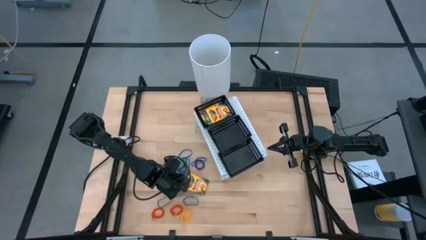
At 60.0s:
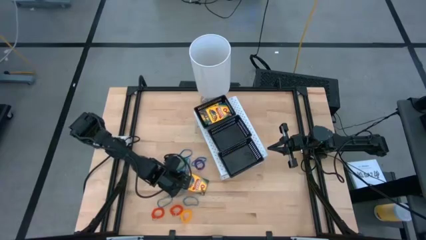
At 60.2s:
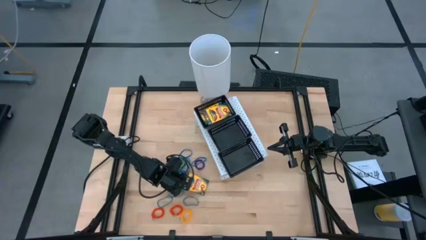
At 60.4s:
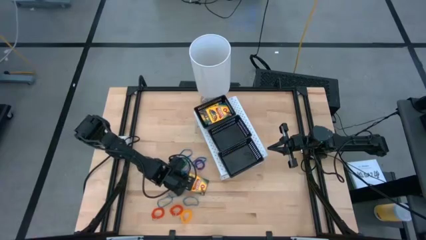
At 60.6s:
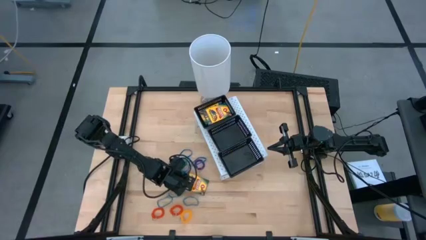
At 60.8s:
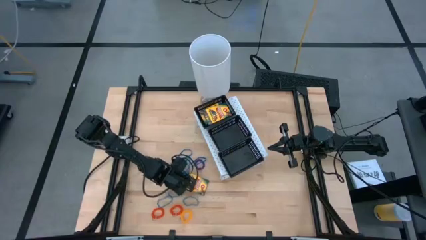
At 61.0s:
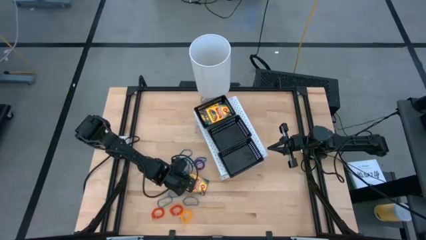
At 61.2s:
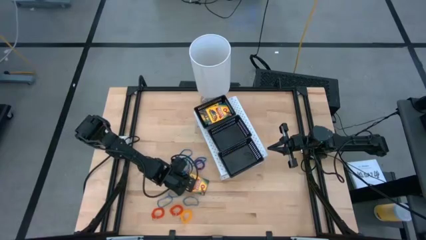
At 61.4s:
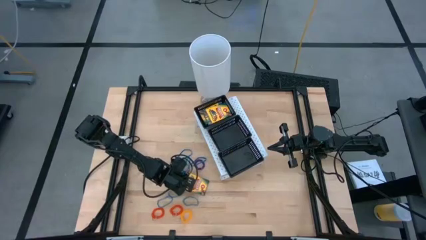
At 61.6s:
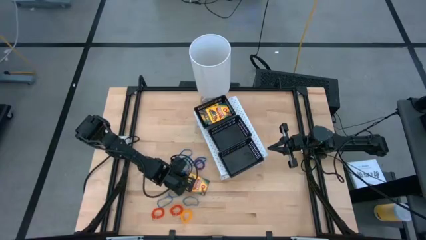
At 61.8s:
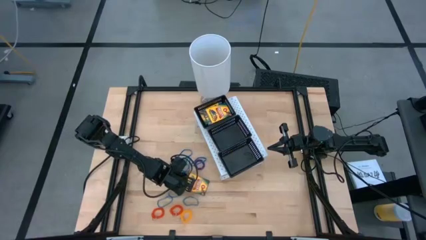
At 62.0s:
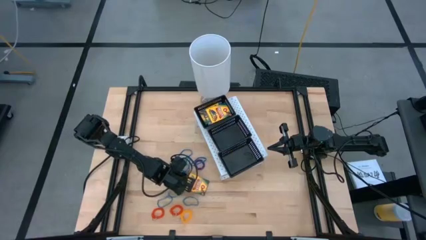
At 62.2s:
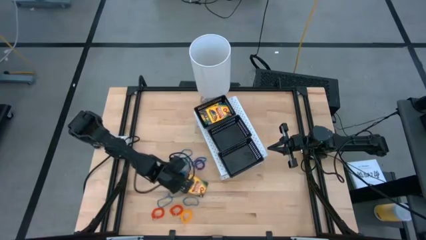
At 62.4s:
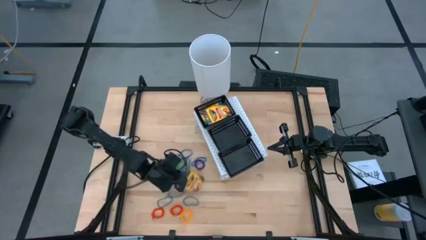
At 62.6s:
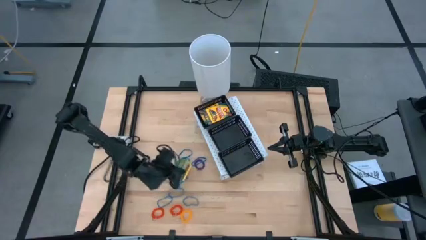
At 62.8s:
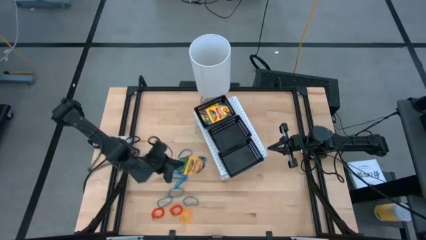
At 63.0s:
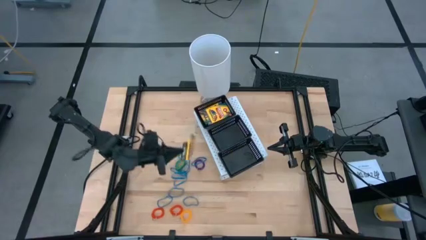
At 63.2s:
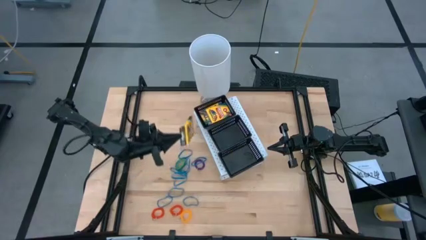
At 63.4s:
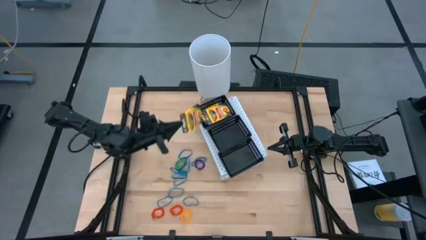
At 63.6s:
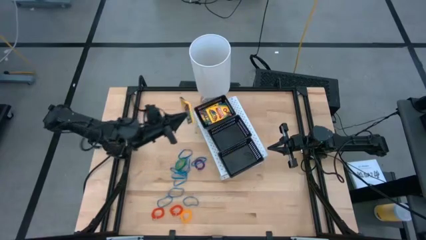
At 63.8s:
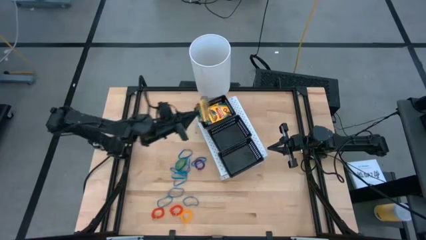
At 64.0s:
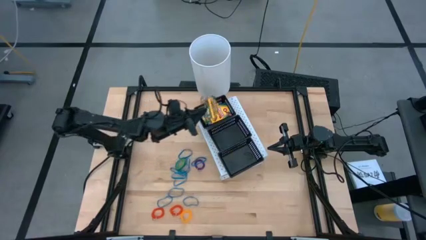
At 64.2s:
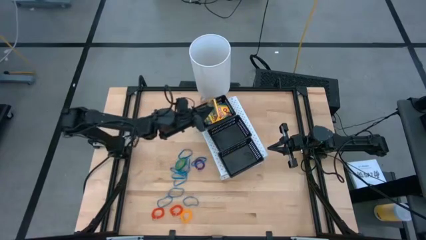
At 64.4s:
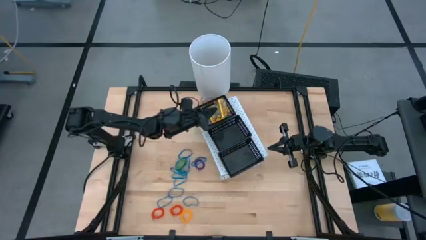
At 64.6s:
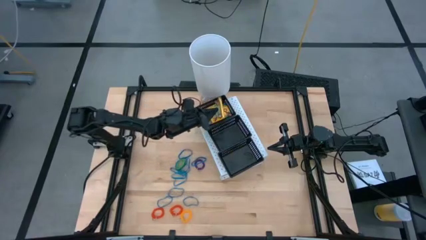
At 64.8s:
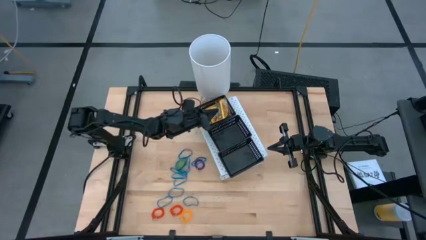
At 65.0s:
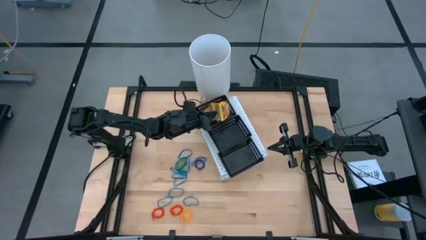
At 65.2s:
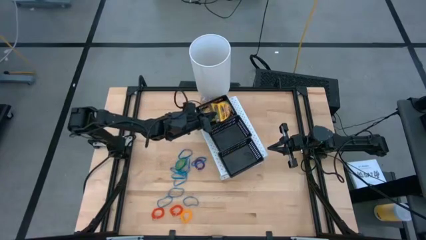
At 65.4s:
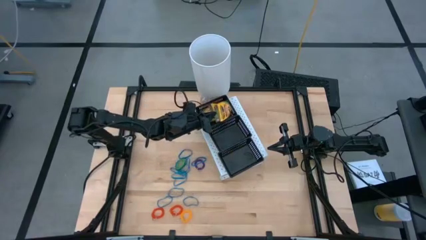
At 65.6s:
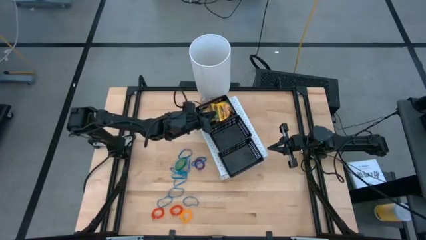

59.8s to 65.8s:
Task: Pick & Place Office Desk Supplies
Put the crayon box into the top black bin on the shelf

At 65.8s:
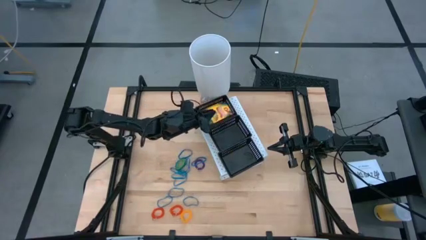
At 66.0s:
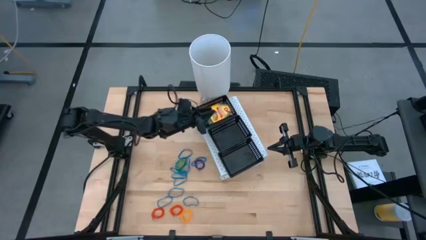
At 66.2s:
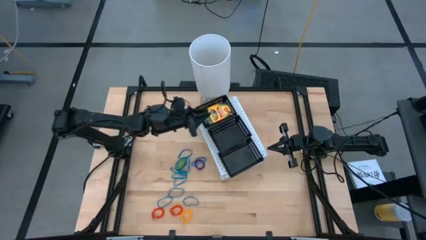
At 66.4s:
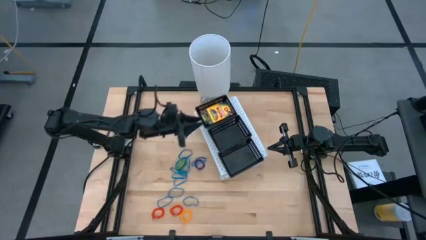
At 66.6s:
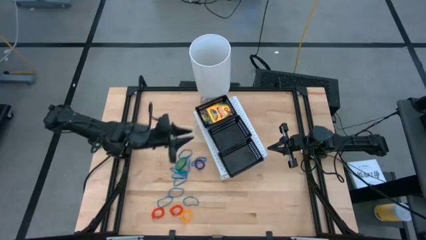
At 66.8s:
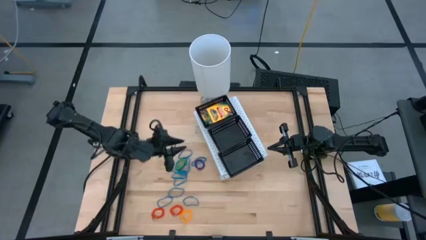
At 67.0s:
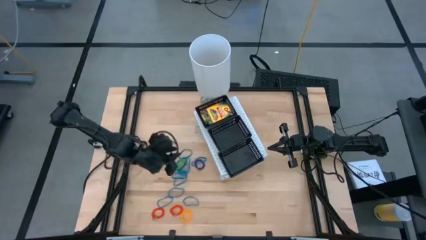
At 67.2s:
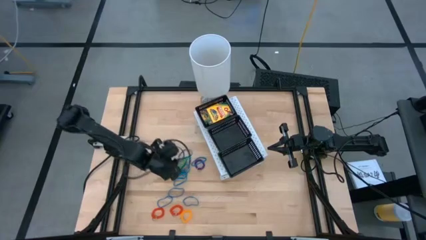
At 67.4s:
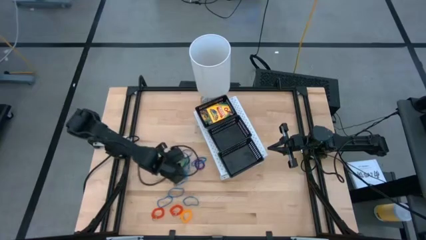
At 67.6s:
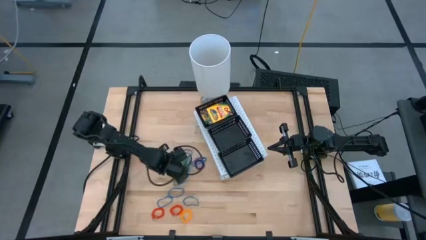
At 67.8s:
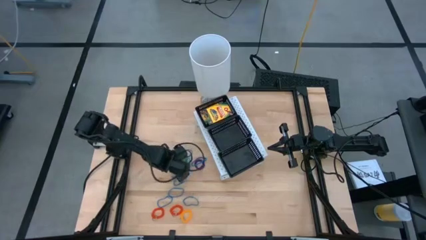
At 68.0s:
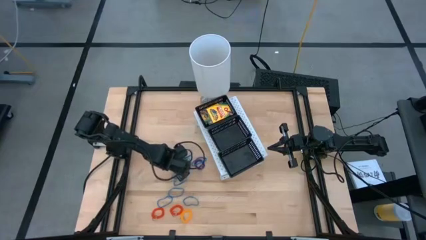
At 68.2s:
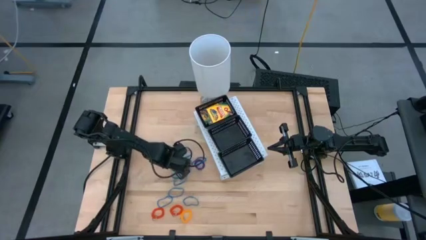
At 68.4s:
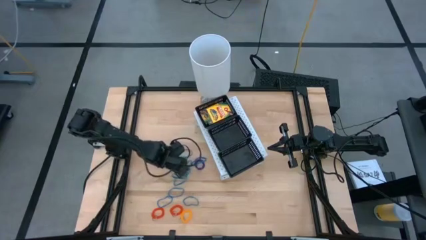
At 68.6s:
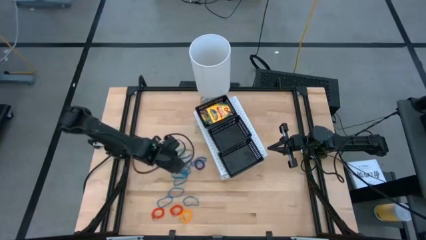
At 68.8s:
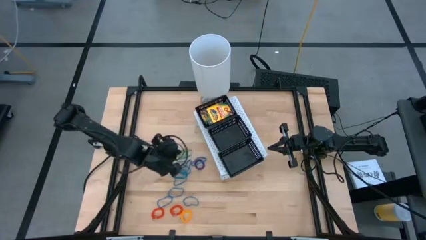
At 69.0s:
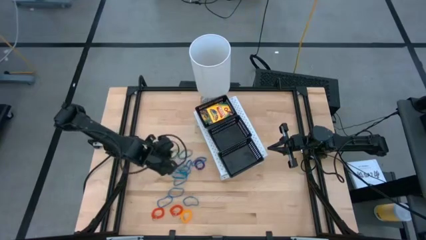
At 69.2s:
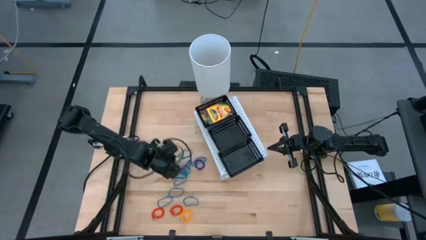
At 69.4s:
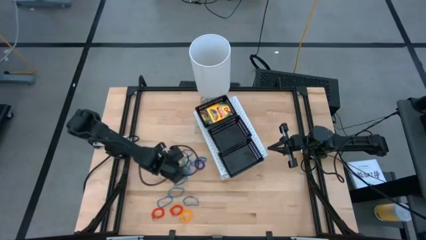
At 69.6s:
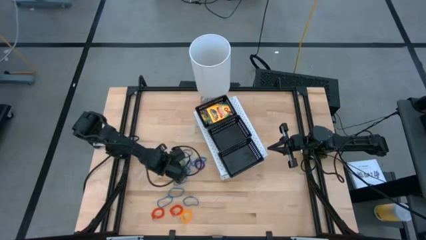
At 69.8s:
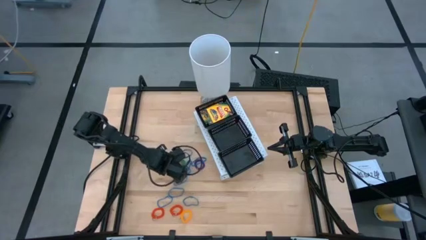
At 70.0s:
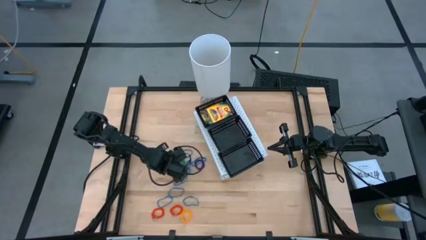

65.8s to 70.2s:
Put the blue rubber band into the middle black bin on the shelf

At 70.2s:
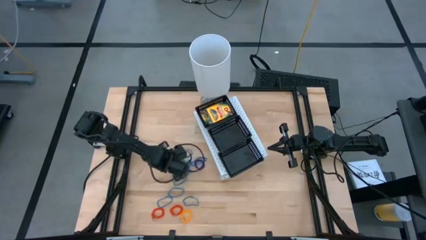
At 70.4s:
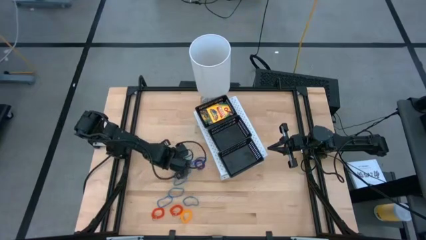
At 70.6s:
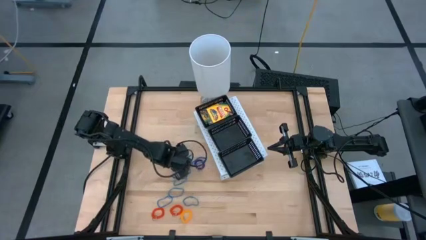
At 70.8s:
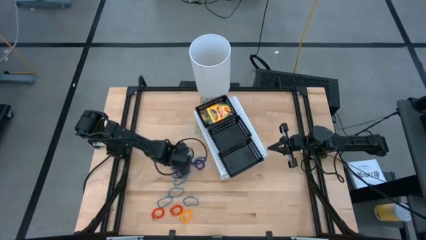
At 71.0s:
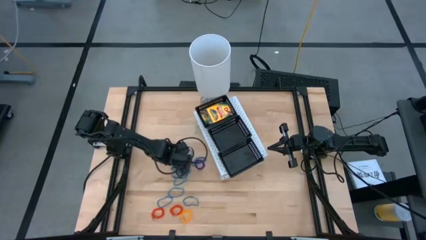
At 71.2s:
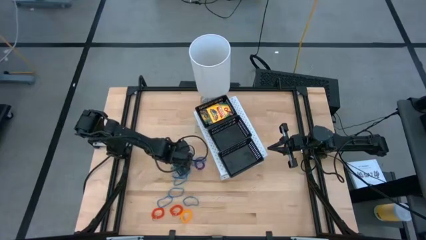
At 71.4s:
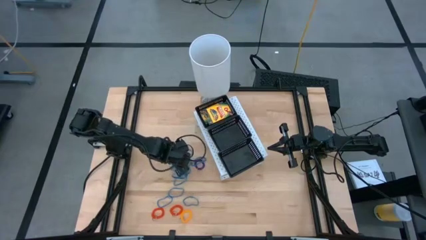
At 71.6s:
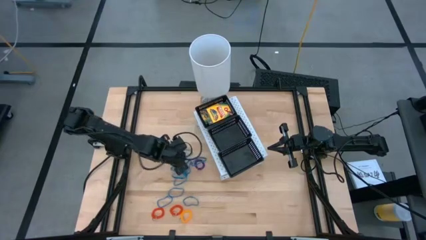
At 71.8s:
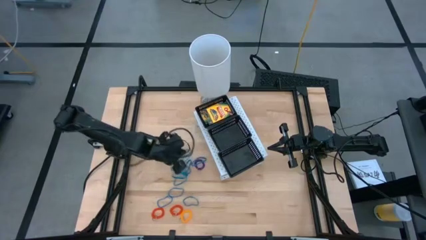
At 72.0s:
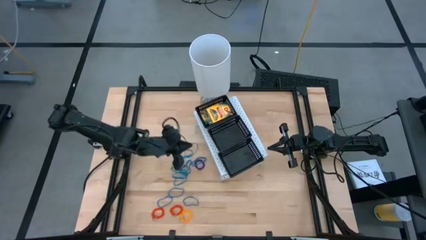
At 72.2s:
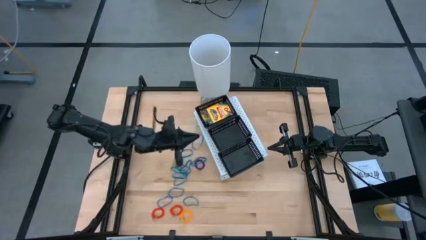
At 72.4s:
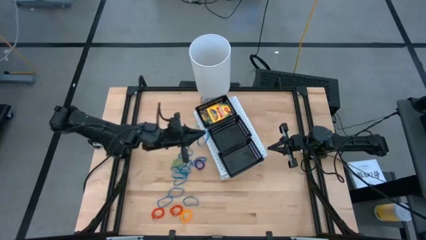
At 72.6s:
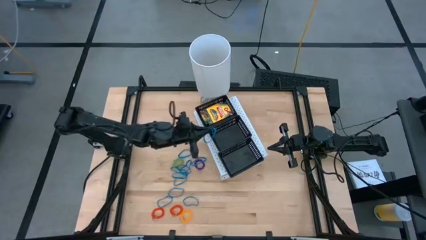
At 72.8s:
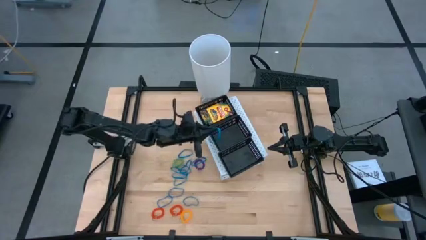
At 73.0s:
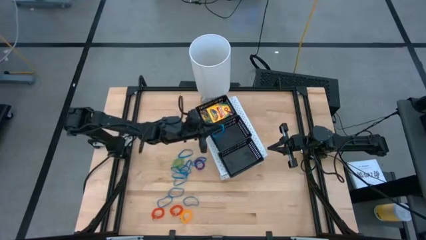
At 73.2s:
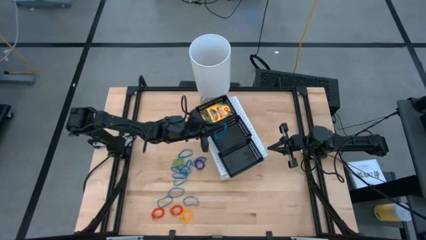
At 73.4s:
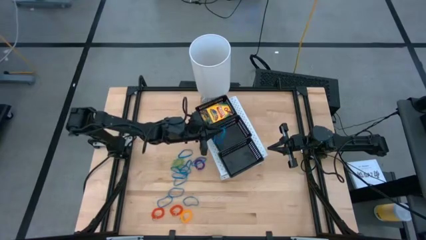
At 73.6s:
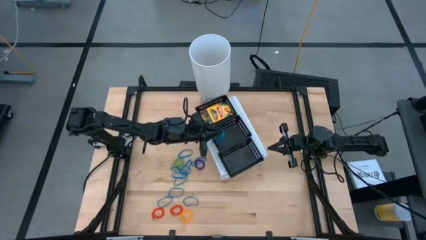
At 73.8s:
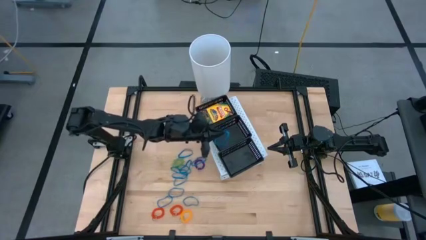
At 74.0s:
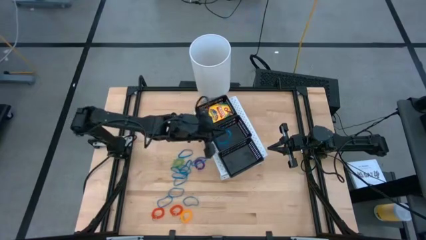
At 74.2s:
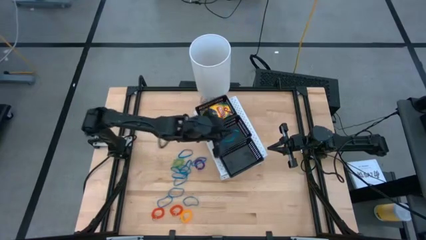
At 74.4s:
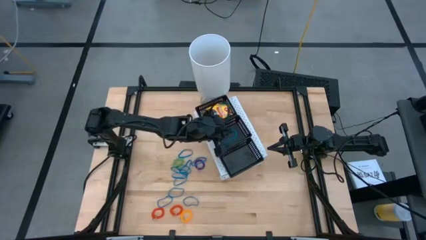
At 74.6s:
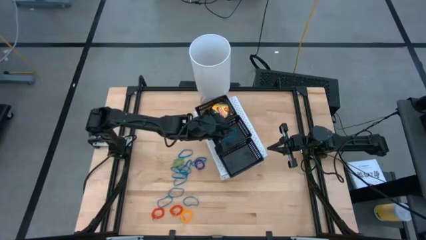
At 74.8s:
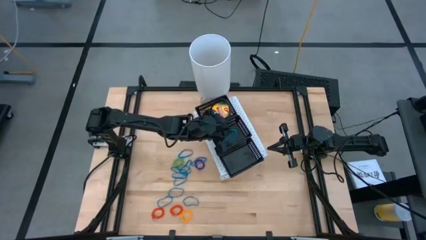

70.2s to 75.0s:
Put the blue rubber band into the middle black bin on the shelf
